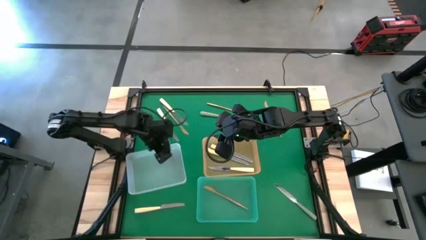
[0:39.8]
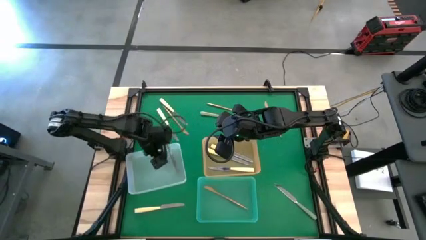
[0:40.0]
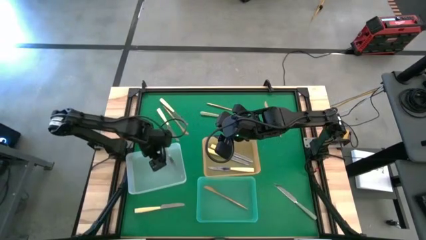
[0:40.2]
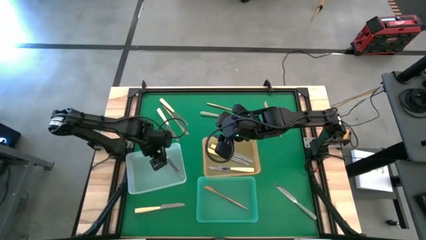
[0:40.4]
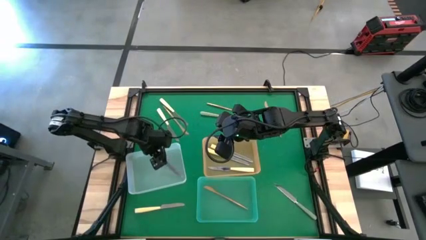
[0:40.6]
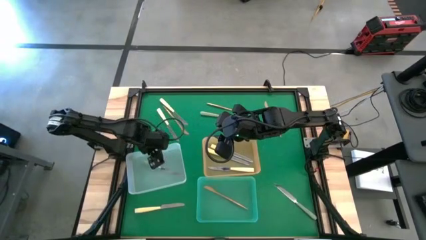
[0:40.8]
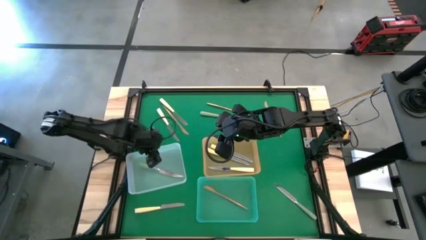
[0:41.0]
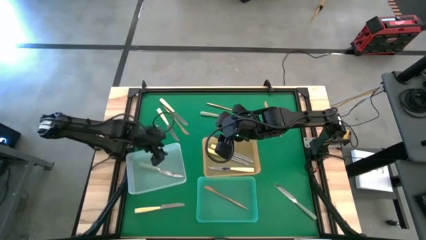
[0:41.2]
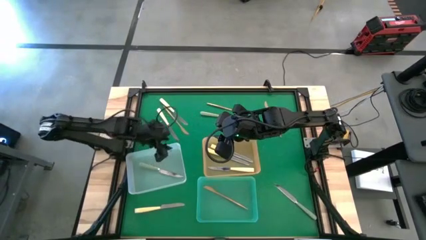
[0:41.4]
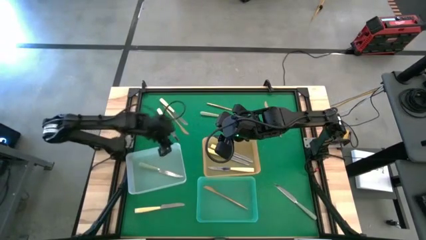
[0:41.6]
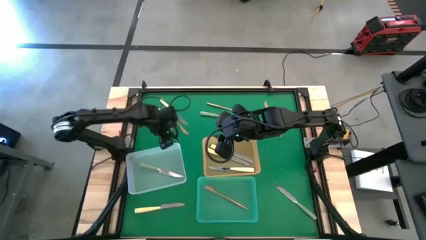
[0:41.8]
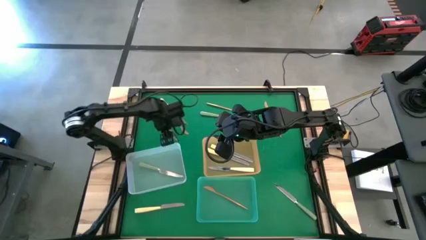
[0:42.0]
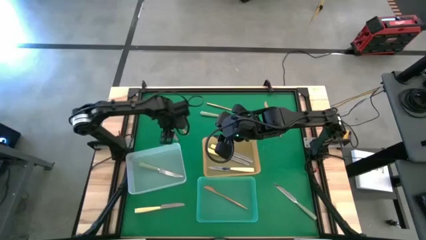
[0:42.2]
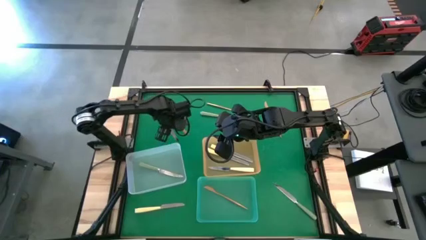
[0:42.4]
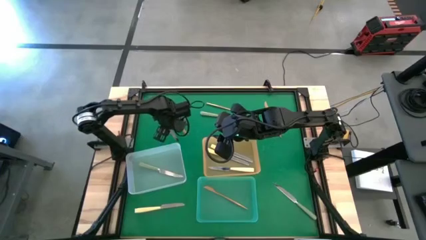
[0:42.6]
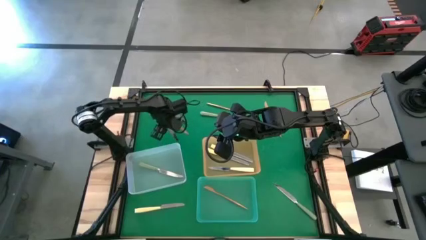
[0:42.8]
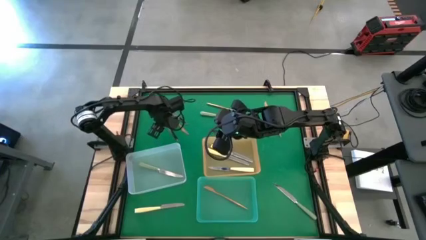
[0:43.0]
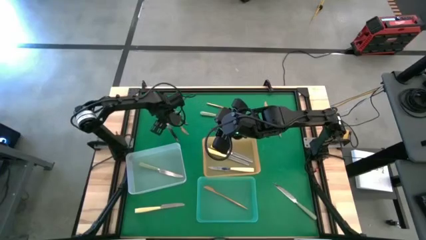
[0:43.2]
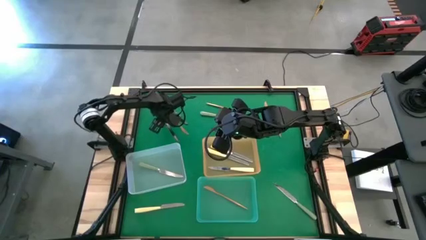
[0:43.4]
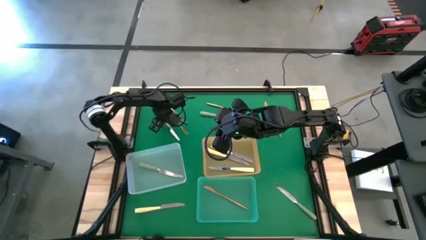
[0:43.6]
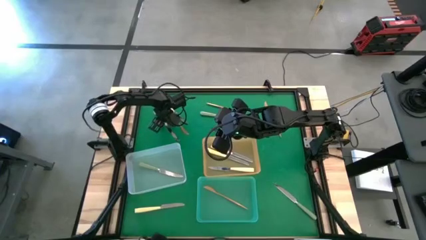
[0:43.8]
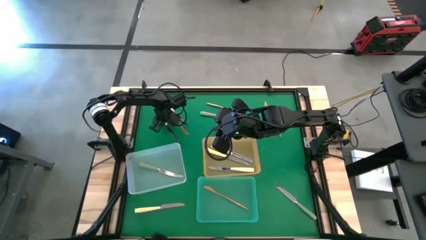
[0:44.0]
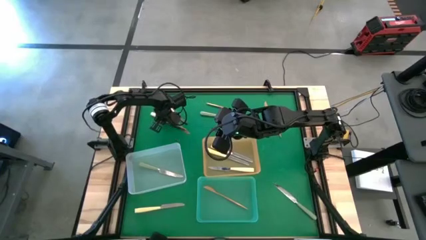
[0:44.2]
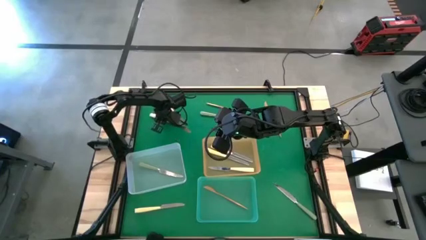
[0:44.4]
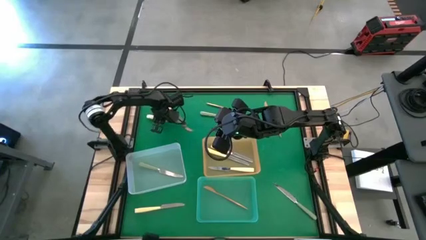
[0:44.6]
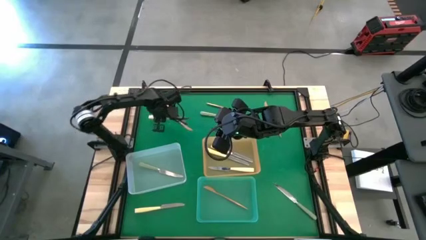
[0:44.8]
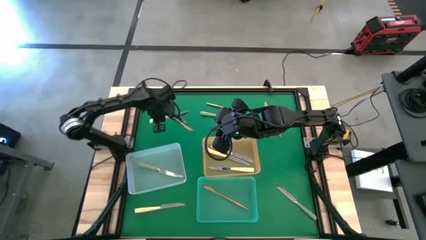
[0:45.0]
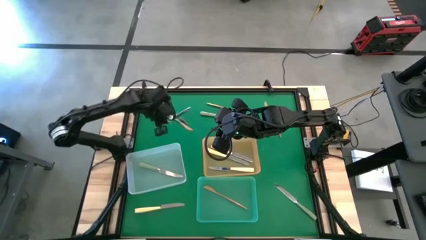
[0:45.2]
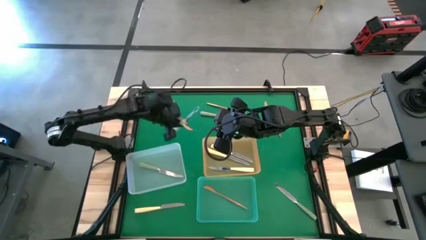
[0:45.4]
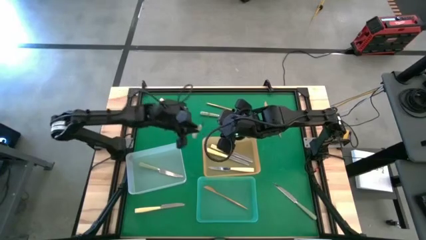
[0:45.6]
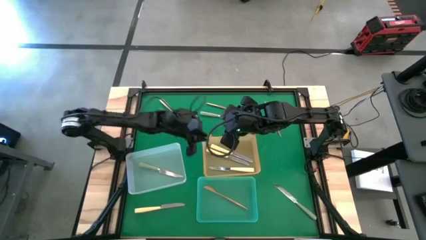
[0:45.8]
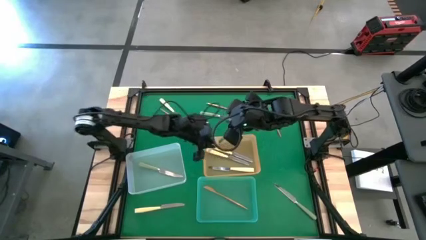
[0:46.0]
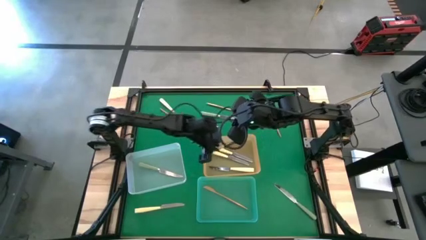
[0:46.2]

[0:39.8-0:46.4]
Task: Sort silverware by color (type)
Put the yellow table knife into the orange bin

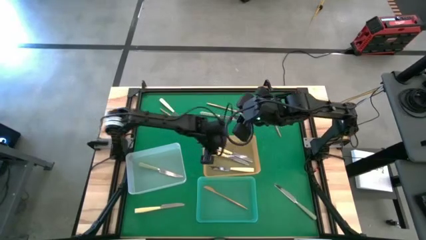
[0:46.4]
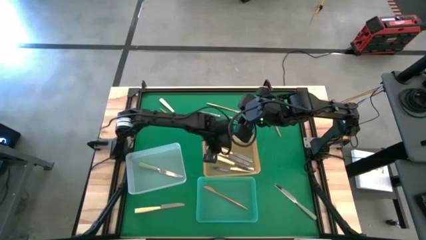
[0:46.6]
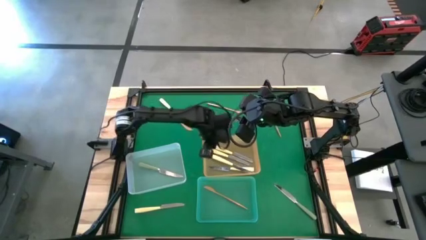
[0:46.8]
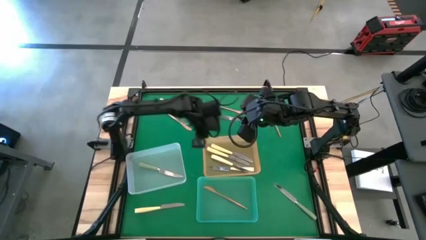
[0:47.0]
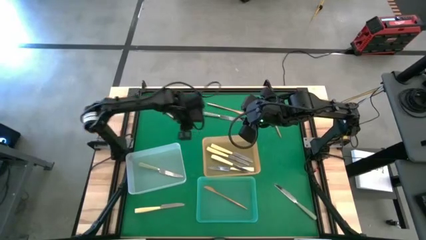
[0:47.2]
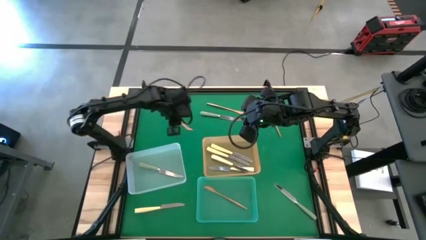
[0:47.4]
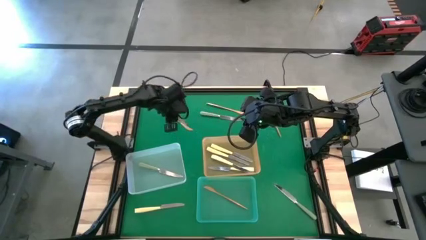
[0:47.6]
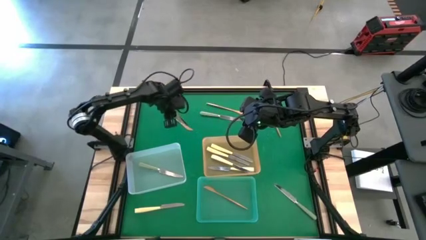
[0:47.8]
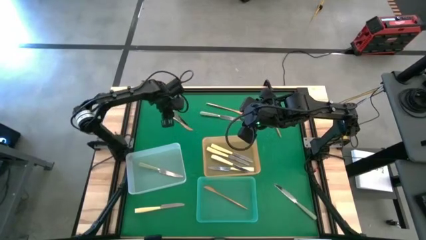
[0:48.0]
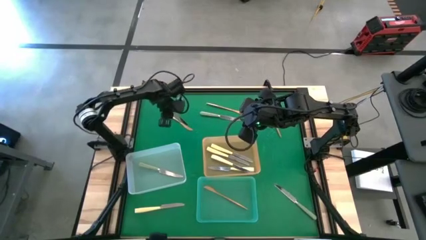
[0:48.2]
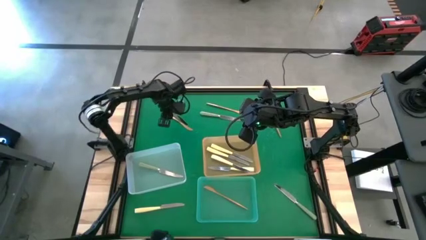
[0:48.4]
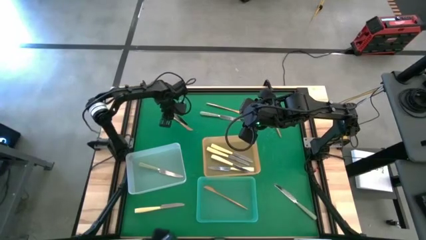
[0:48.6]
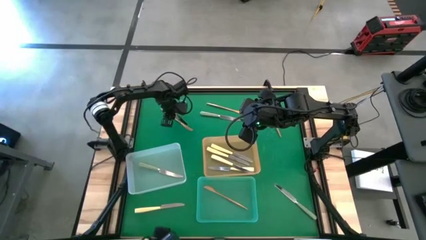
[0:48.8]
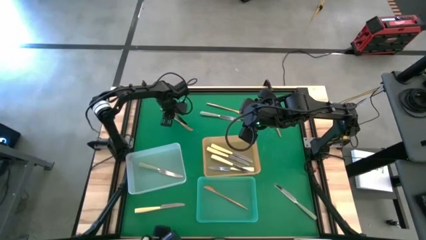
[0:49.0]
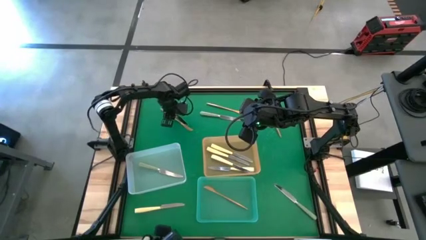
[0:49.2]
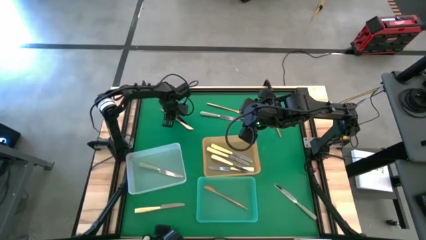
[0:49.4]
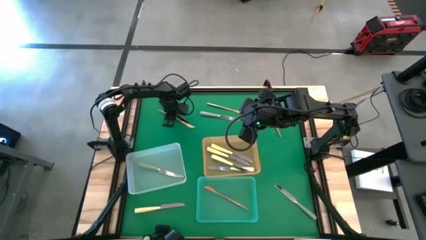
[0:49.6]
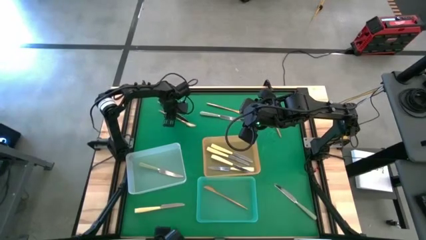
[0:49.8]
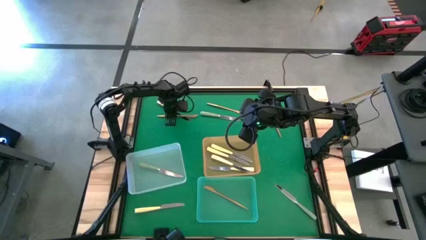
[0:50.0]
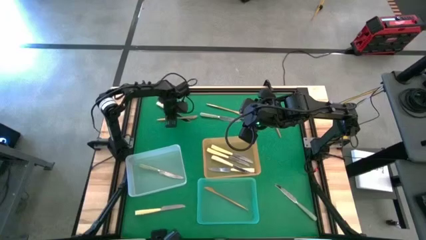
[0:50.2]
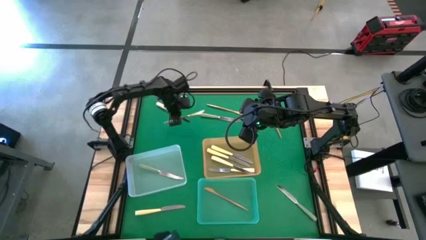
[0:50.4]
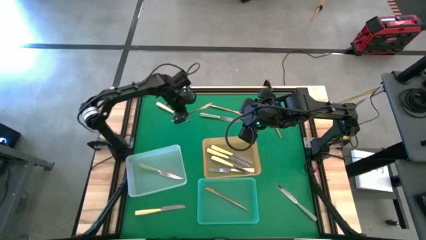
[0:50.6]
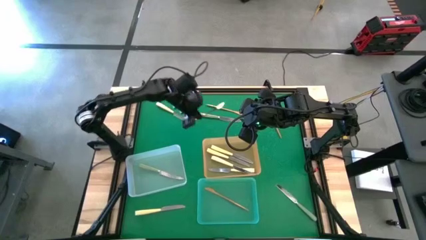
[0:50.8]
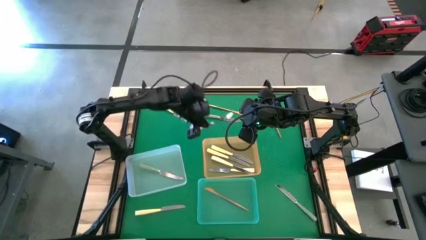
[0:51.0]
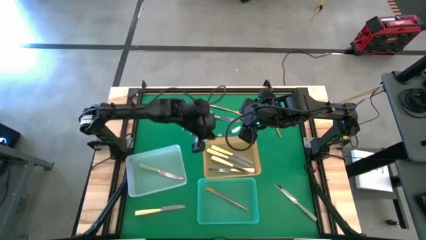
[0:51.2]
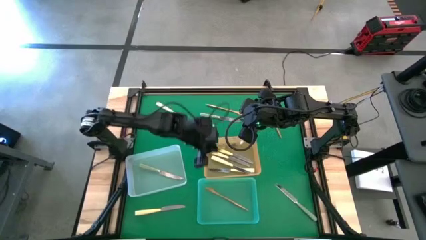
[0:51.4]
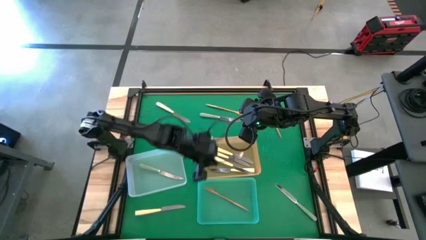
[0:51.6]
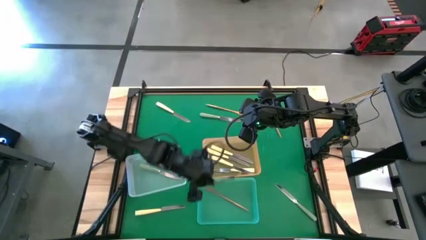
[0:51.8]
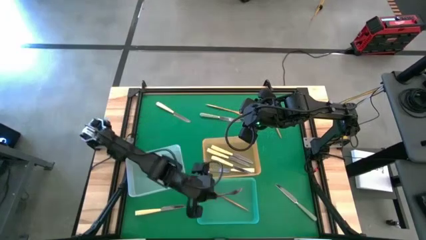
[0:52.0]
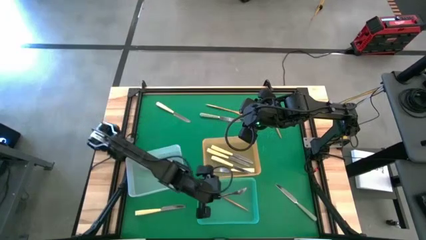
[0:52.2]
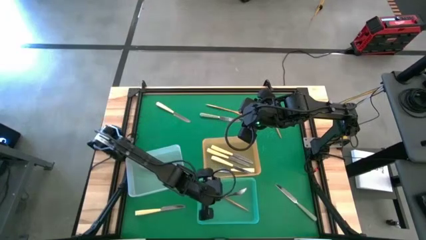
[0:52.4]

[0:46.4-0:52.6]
Put the gold table knife into the blue bin

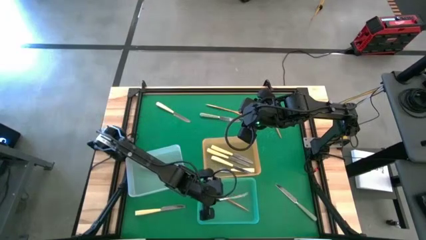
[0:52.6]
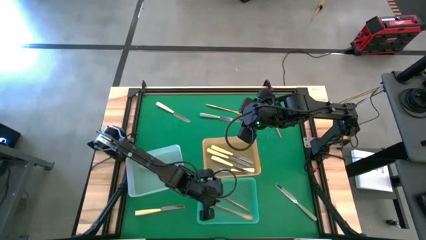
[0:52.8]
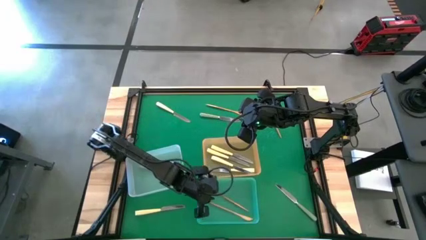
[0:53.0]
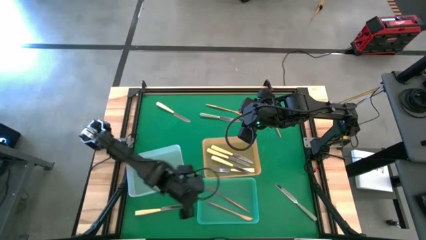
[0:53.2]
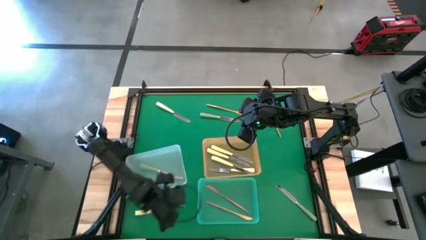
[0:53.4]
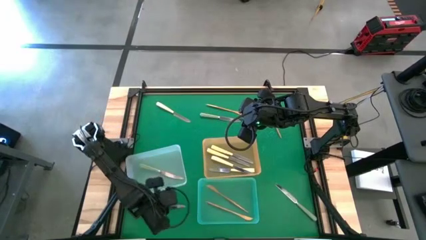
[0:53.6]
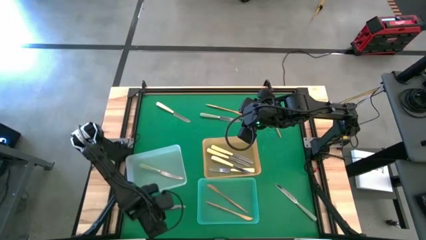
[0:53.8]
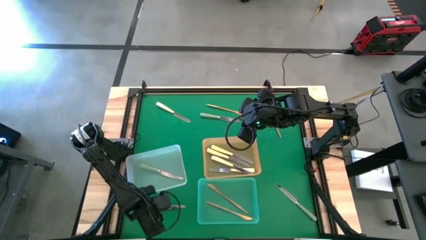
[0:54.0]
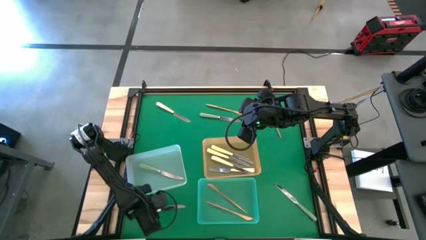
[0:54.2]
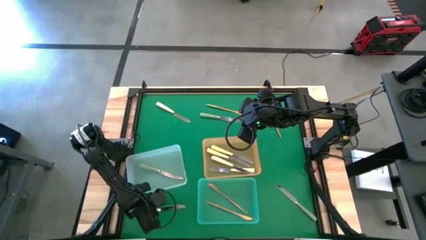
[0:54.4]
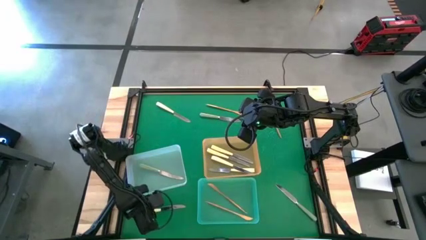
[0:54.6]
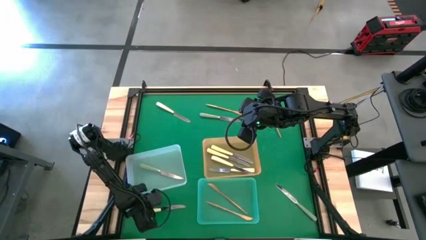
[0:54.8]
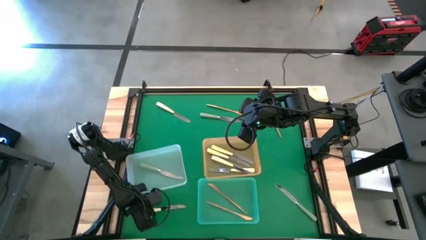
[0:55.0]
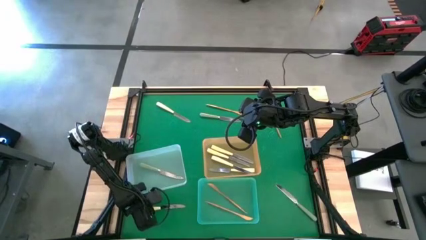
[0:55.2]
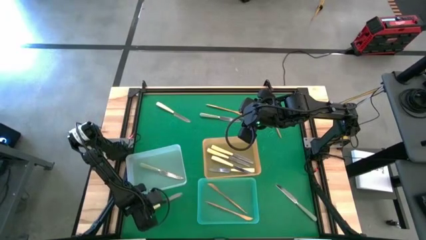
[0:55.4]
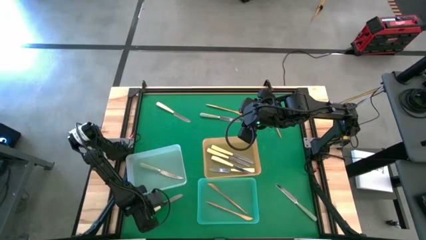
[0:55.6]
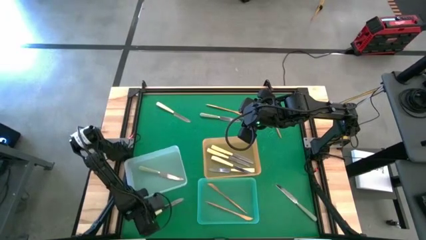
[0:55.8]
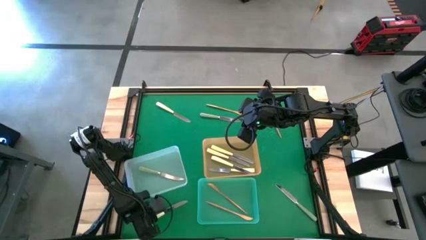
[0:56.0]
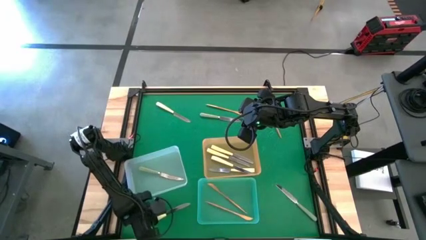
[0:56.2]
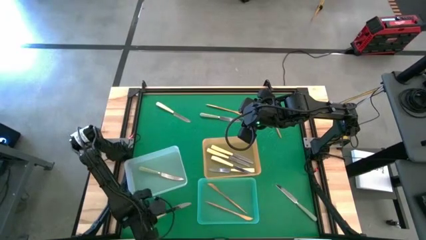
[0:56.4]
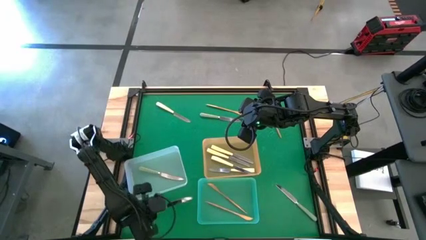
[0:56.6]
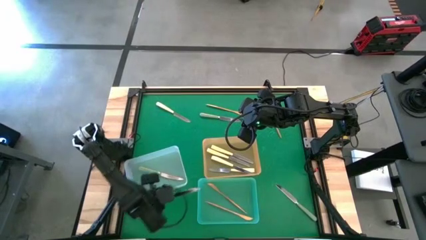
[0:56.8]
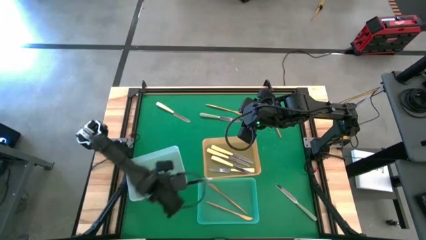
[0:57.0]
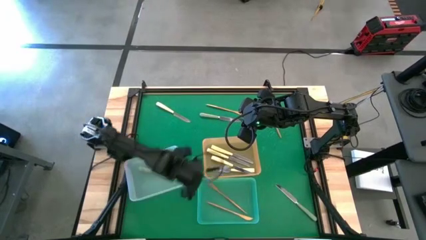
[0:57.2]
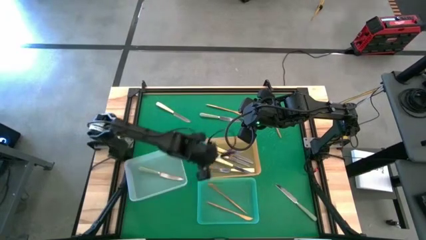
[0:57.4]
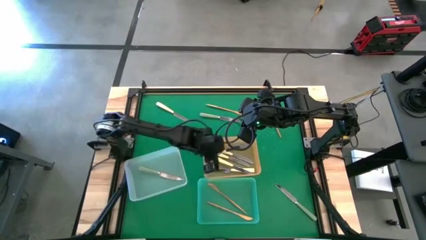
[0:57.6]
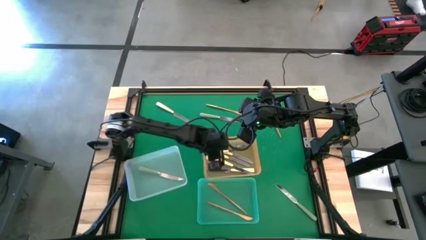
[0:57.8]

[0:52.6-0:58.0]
Put the yellow table knife into the orange bin
